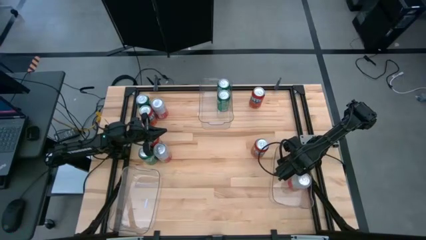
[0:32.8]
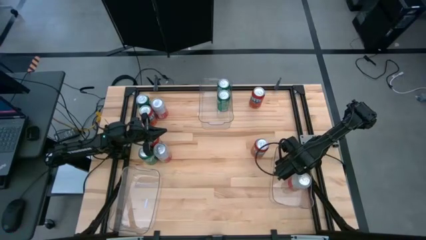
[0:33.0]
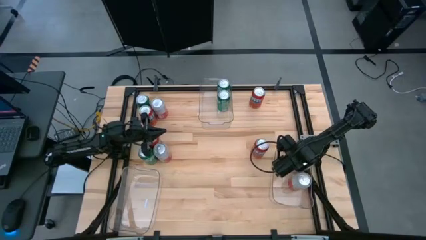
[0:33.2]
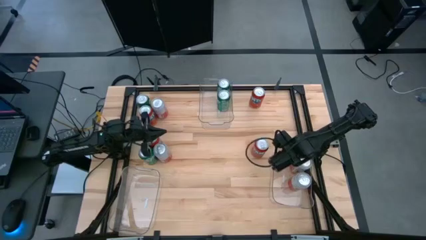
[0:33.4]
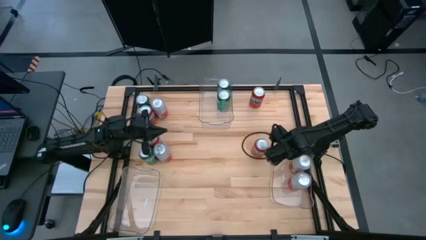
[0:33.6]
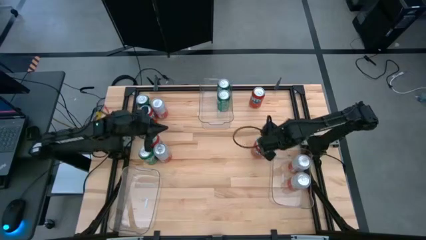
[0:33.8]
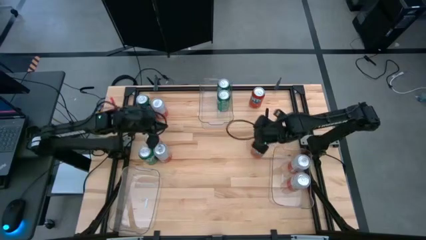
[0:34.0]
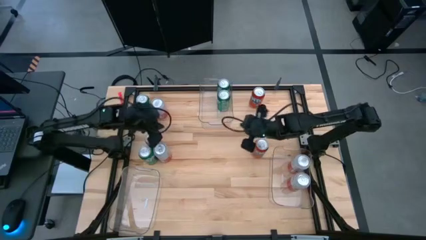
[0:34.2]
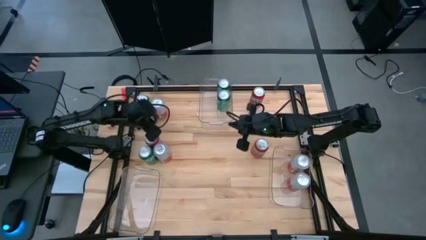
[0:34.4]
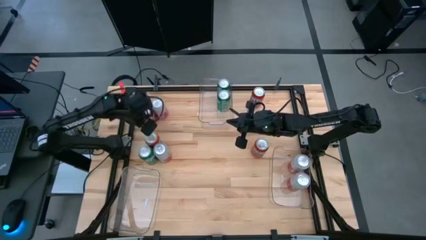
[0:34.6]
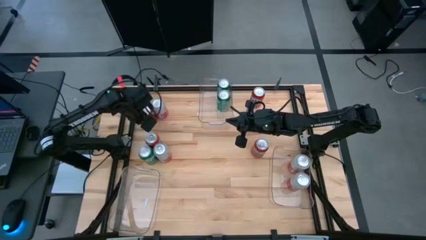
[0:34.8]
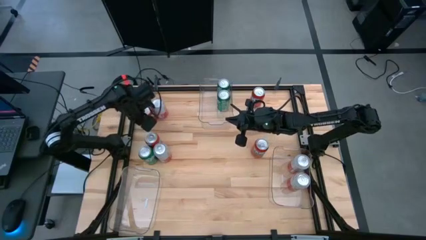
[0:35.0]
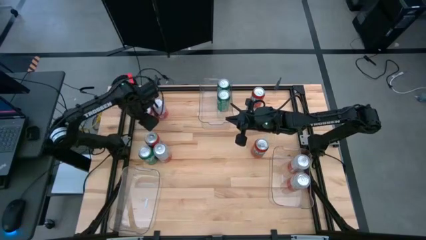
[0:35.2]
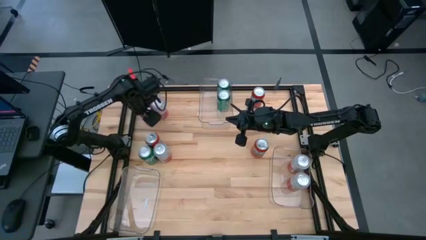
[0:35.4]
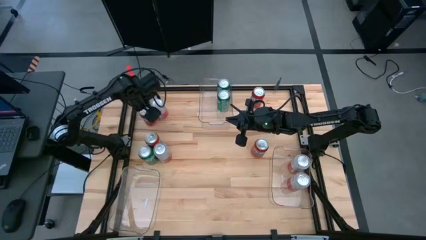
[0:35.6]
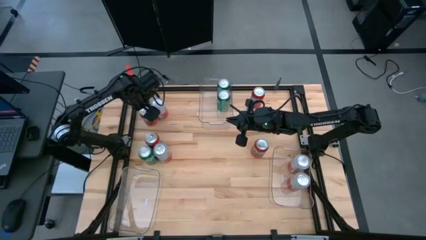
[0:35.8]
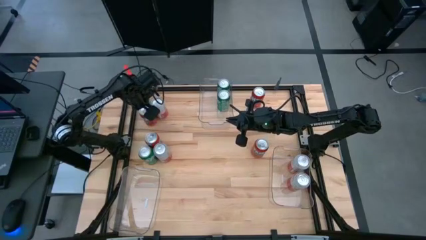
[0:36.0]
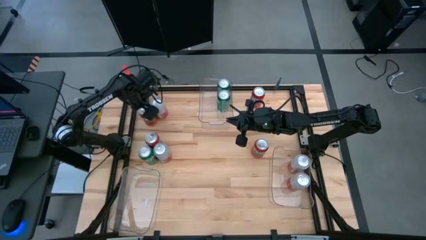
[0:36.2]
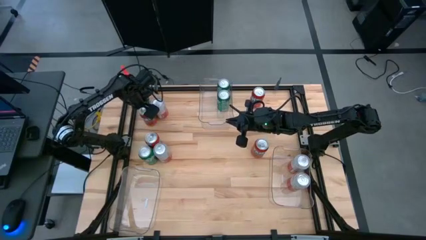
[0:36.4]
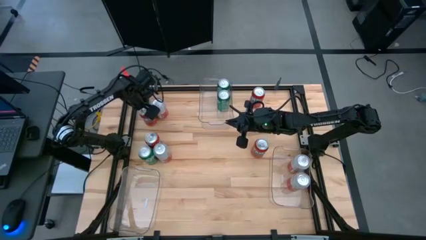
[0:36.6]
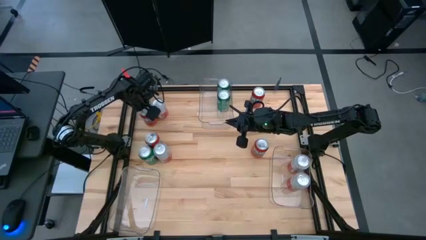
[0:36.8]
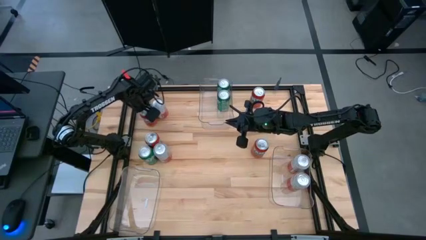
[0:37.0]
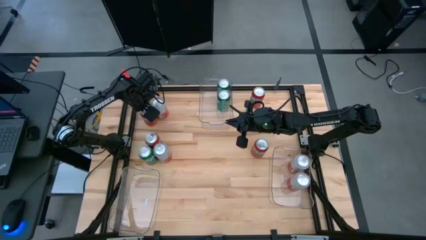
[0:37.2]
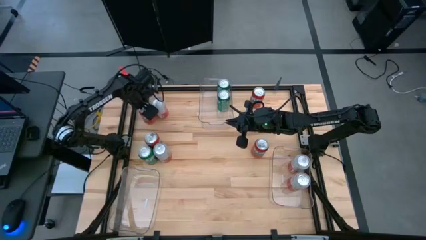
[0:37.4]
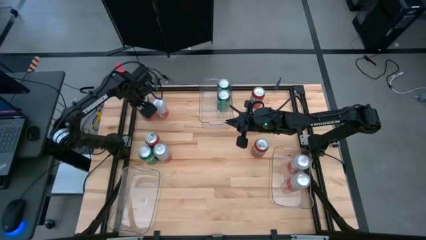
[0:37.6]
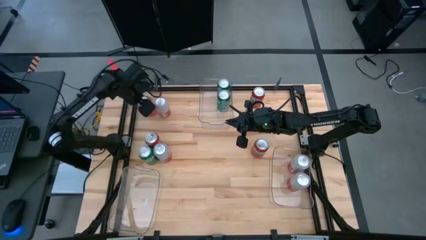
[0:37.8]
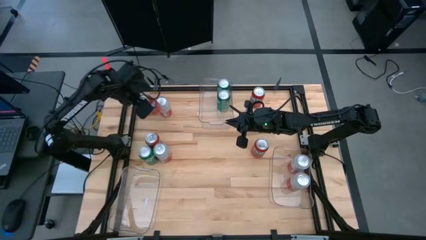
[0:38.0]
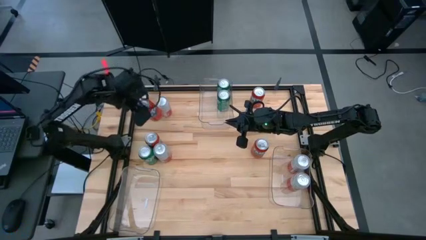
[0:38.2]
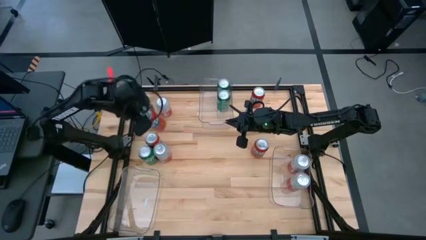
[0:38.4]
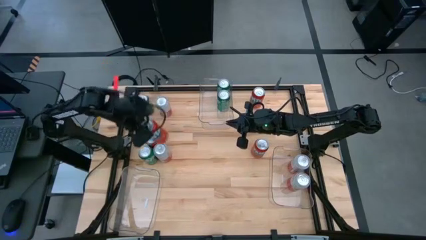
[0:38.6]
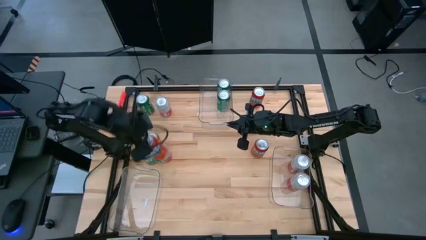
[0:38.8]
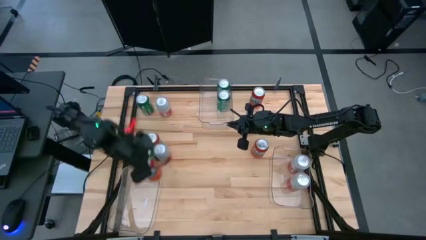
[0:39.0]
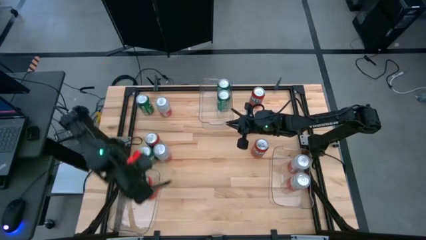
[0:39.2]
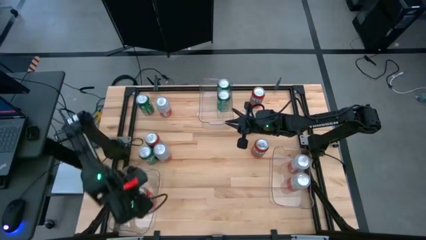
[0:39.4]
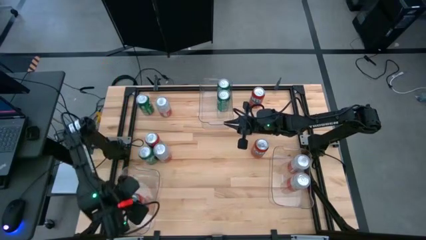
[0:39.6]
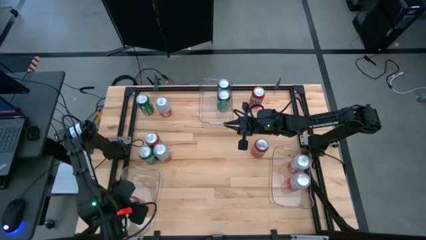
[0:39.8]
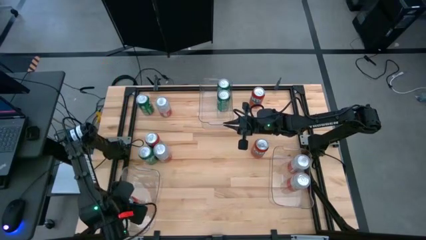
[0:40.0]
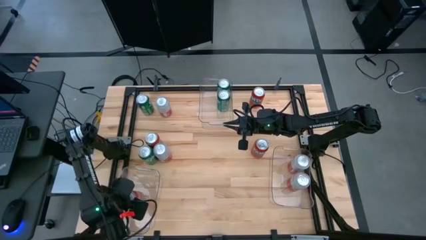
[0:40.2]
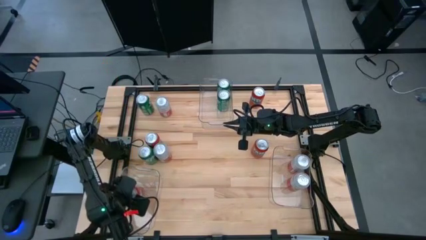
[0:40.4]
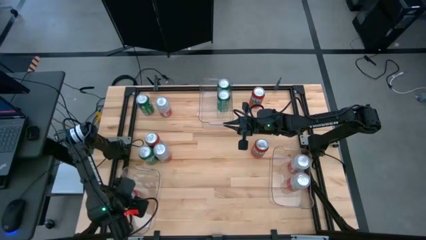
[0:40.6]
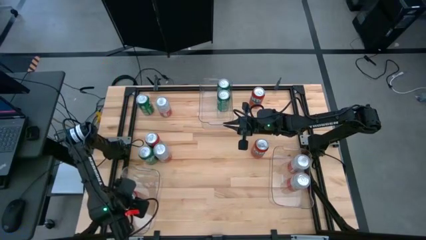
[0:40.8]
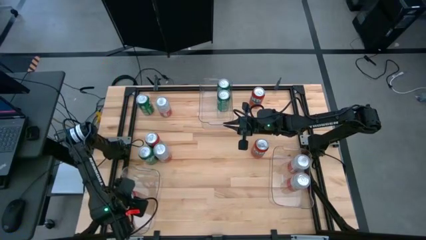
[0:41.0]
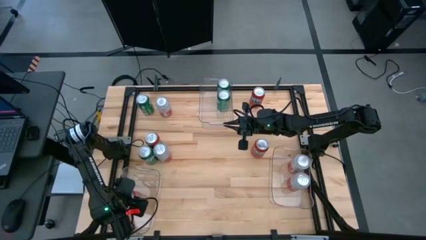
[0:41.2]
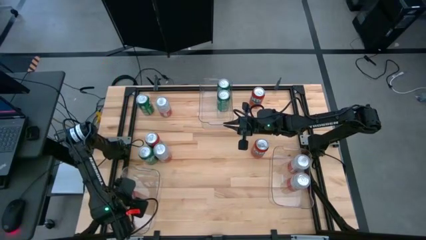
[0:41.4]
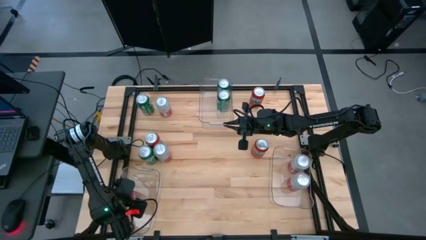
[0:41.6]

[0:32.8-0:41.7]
Task: Sort soda cans
Put the top left red soda can into the bottom left transparent bin

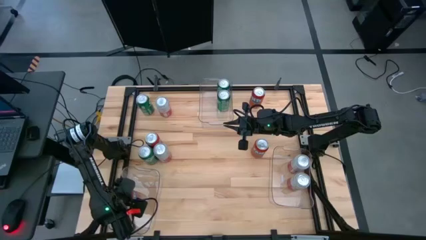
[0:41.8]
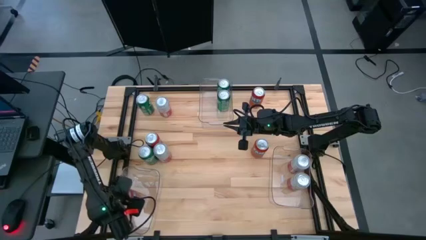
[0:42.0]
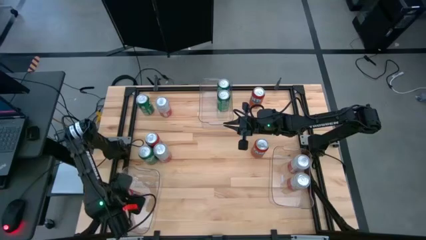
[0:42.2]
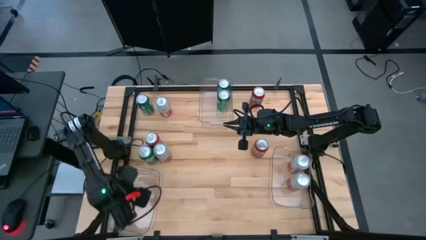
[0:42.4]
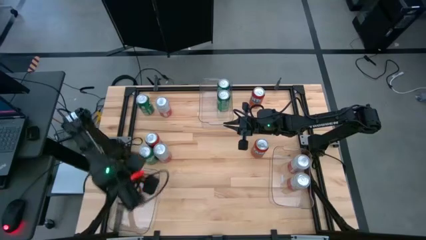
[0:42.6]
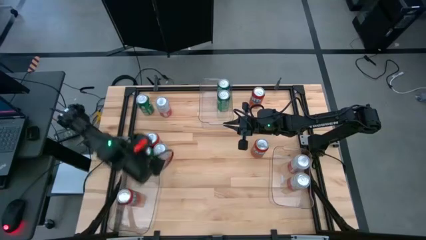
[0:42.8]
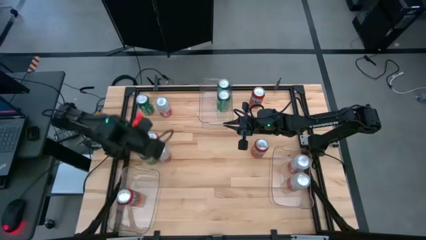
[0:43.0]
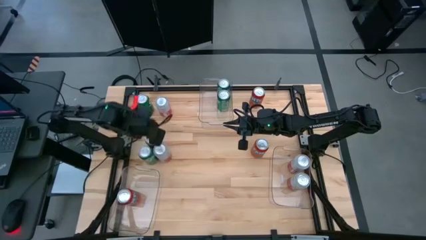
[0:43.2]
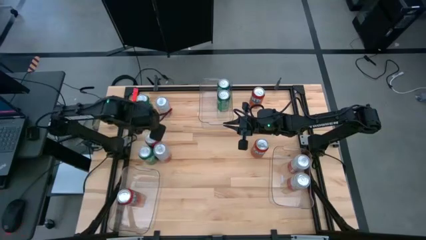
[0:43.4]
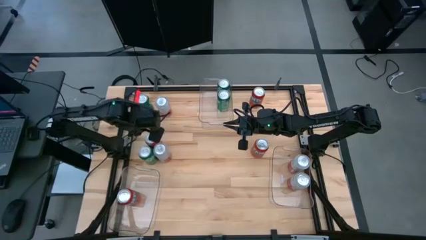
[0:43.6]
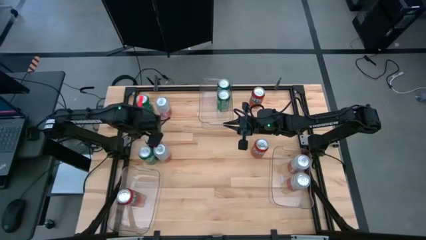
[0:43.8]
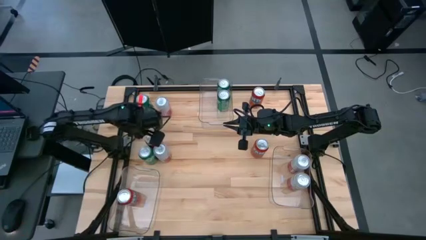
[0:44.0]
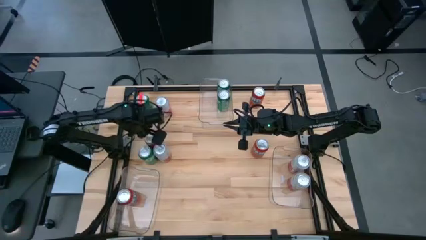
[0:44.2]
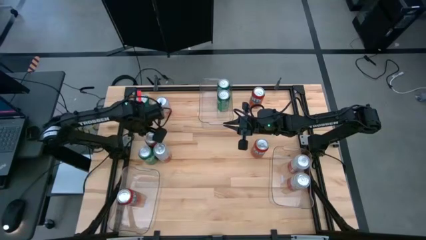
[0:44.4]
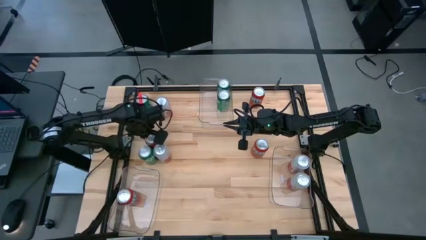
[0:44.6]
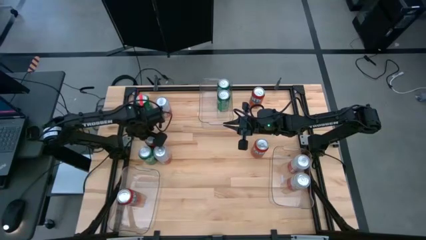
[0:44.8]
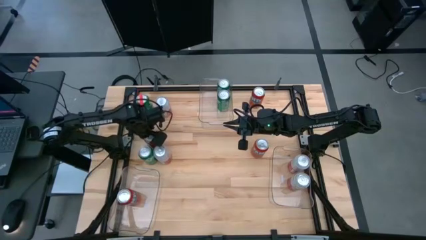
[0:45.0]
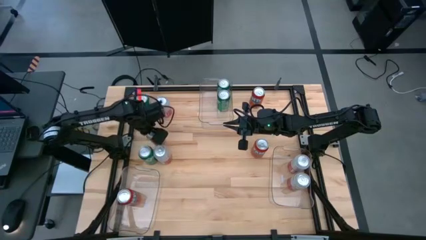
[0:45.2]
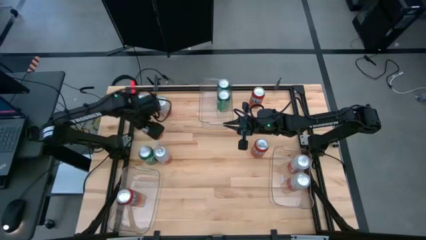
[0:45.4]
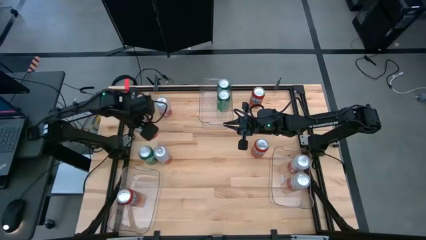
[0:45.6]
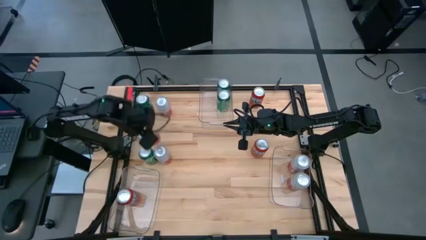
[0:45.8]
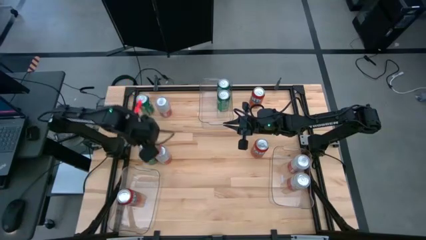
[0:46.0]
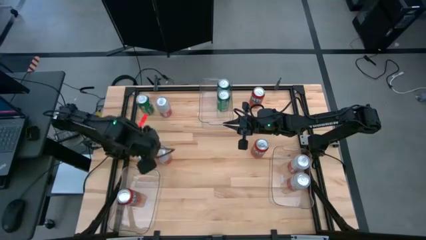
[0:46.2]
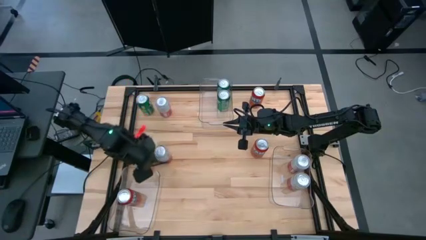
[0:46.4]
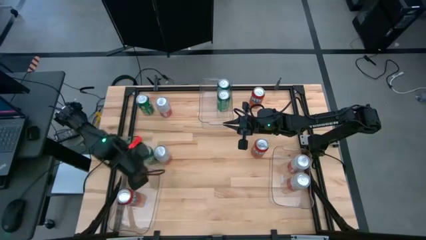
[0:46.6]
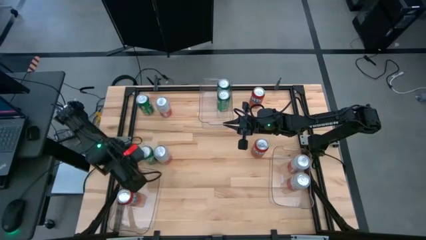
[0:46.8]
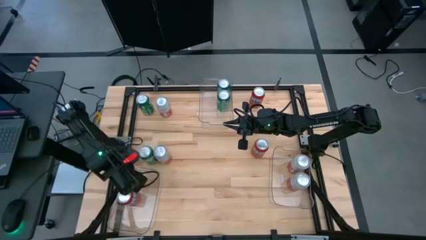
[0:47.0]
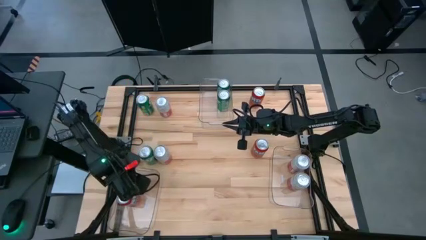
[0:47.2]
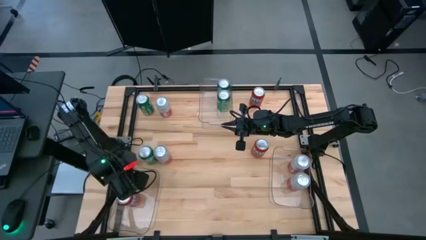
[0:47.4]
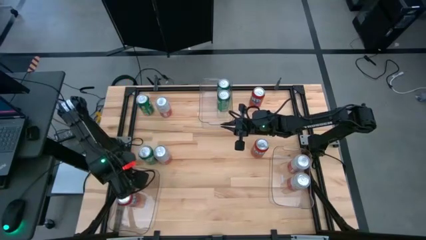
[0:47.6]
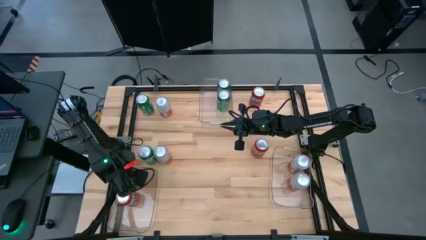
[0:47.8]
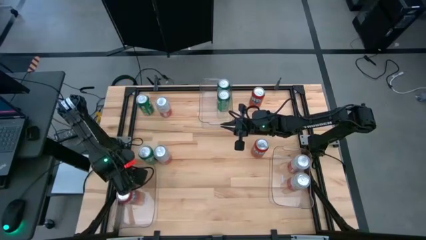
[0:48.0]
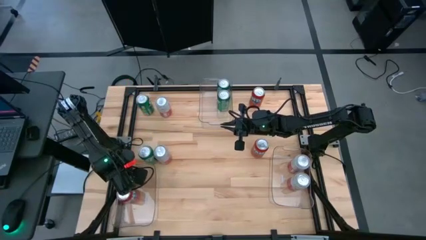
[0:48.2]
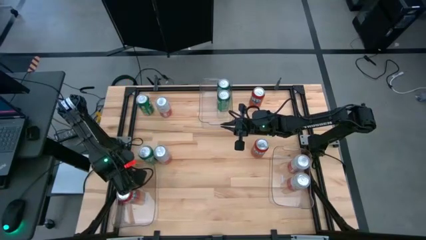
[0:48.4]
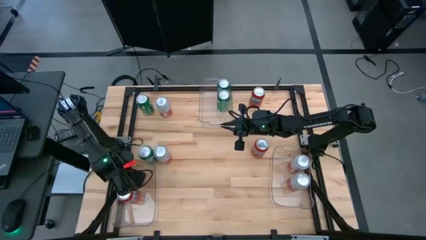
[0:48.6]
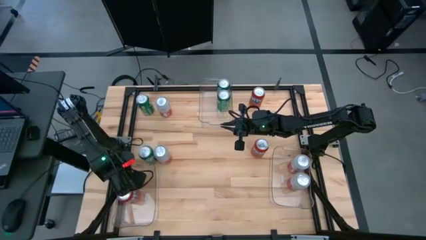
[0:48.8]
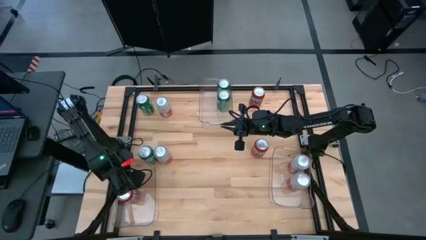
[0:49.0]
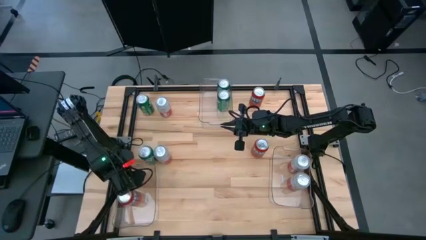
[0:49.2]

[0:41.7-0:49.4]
Put the bottom left red soda can into the bottom left transparent bin

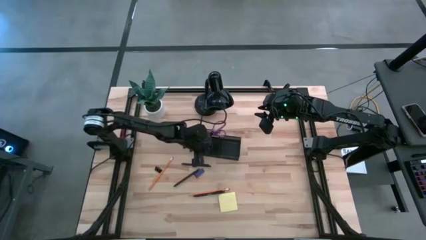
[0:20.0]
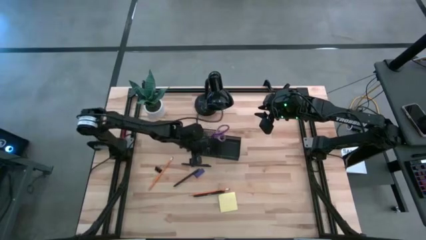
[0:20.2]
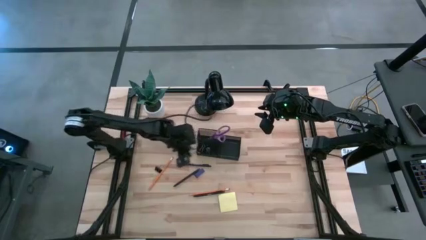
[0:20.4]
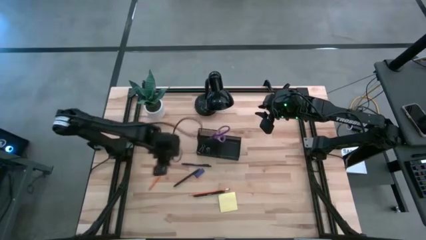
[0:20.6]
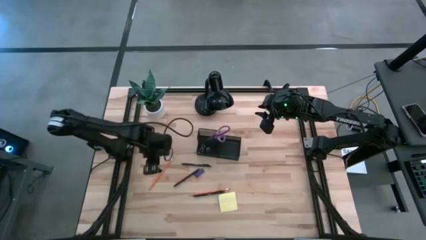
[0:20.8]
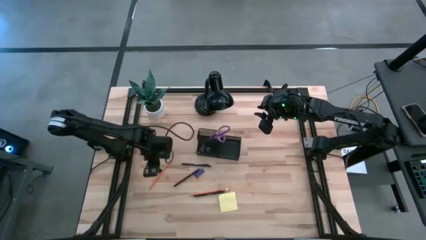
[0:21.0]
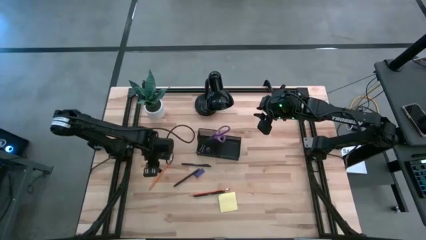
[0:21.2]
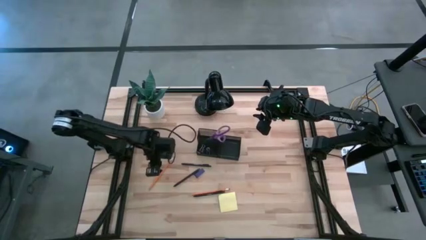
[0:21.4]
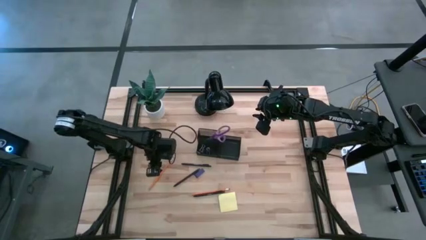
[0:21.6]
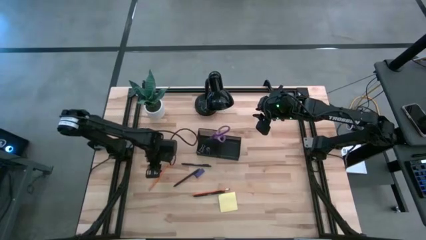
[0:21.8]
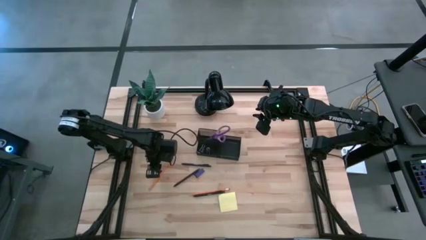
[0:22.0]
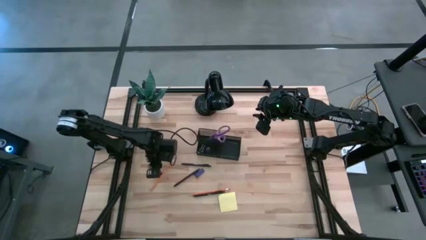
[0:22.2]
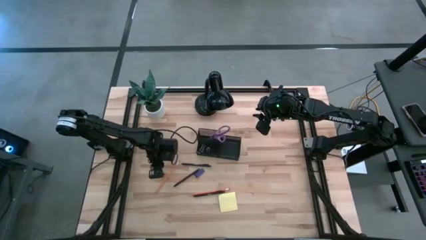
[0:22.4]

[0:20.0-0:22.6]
Task: Pick and place office supplies into organizer
Put the black binder clip into the black desk organizer
